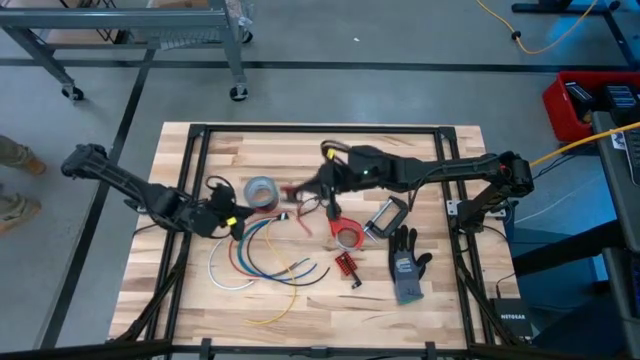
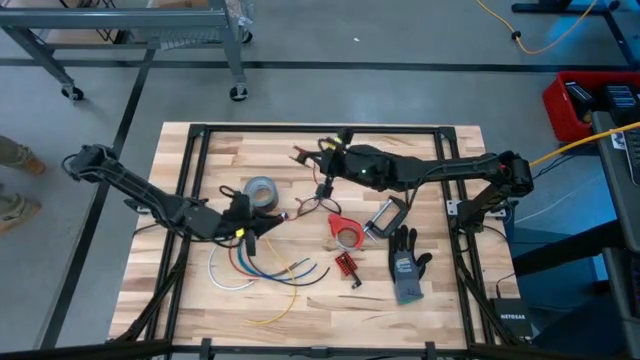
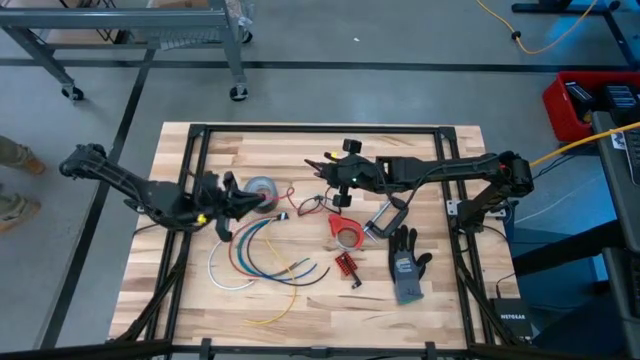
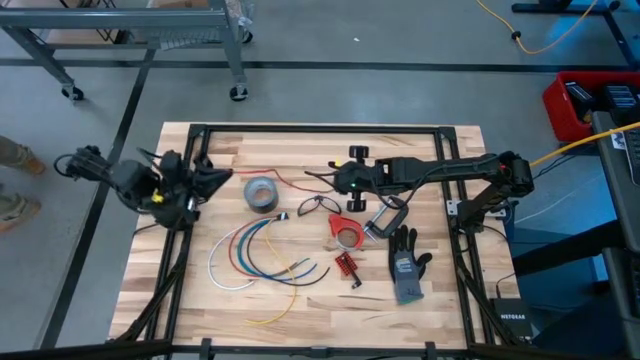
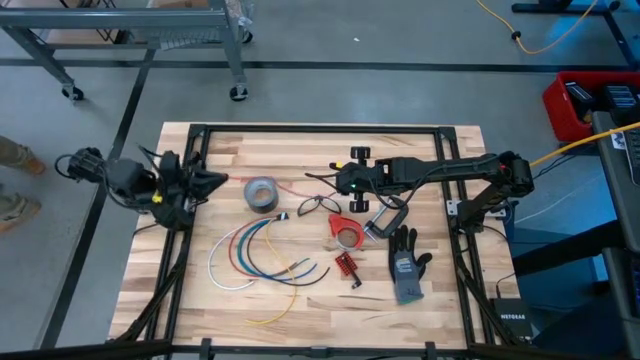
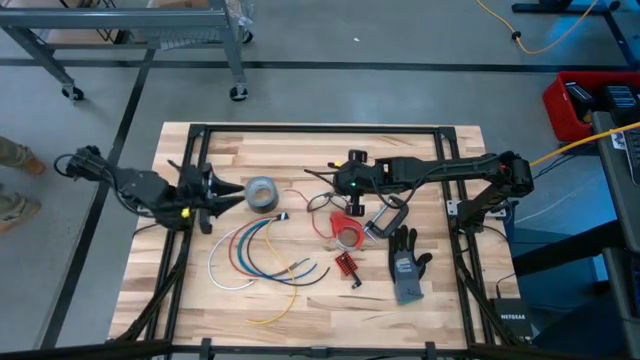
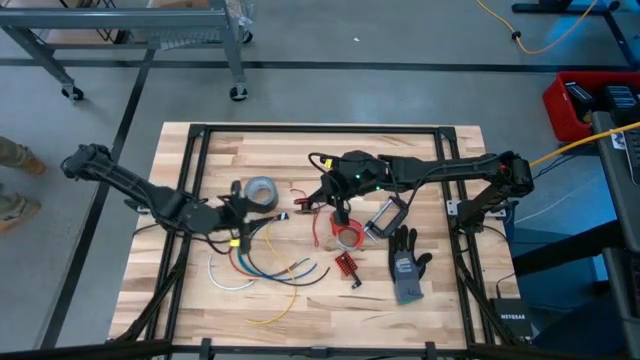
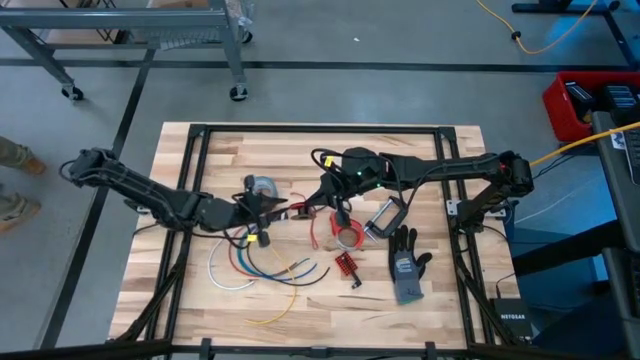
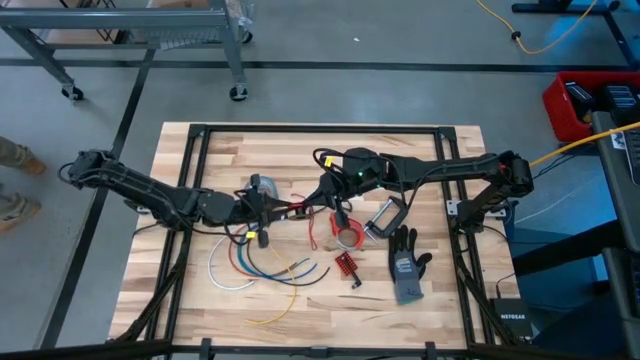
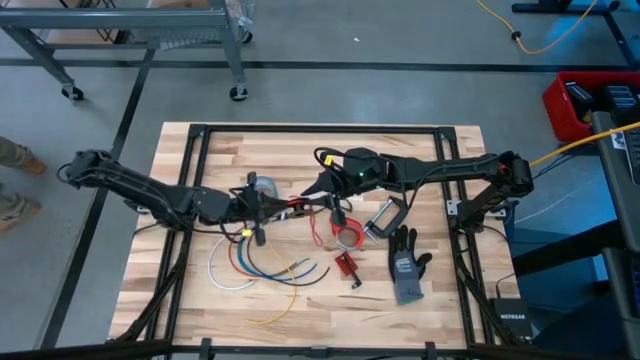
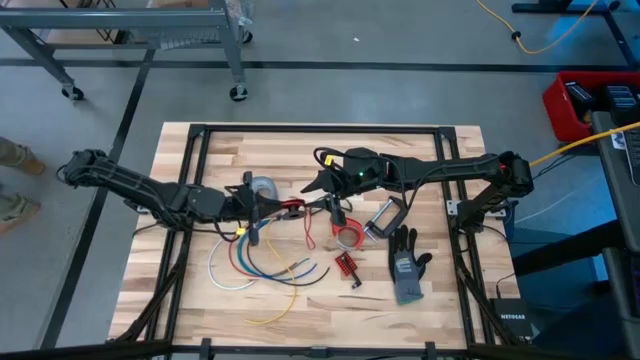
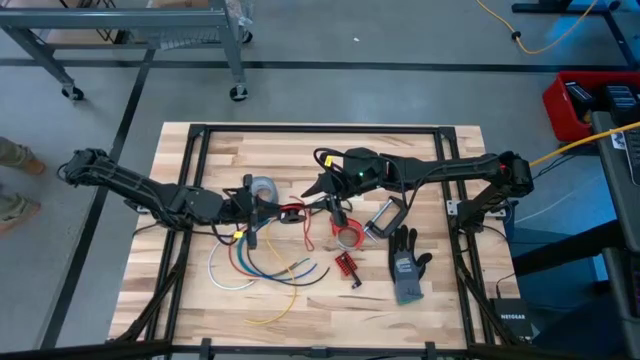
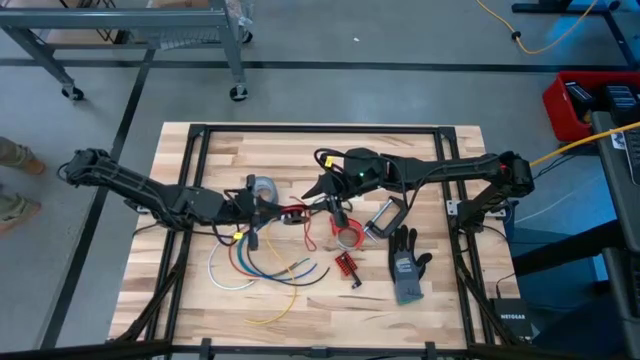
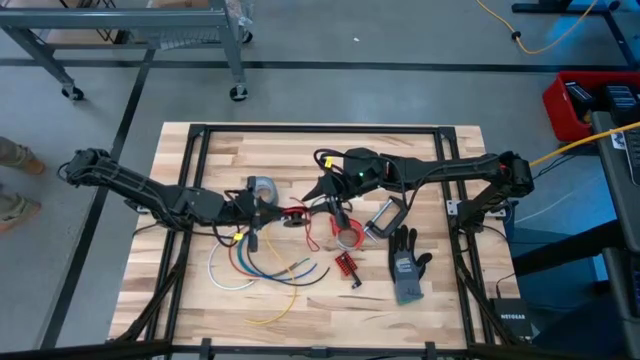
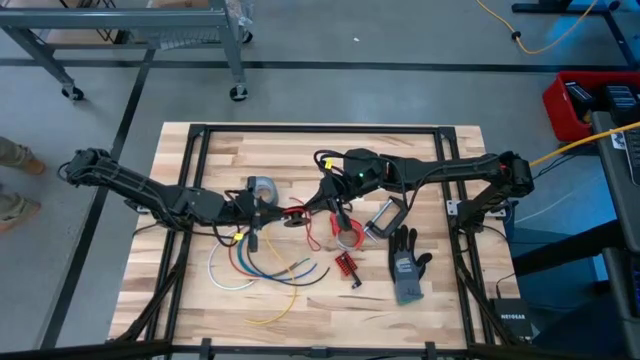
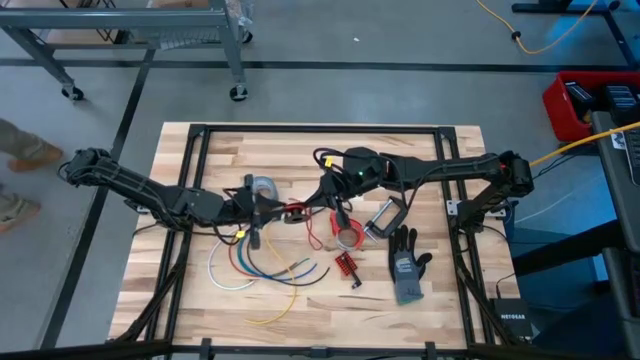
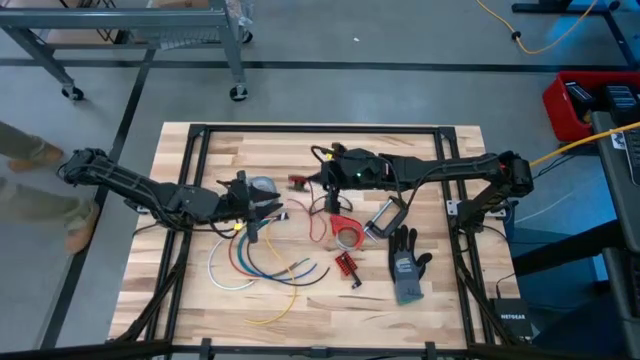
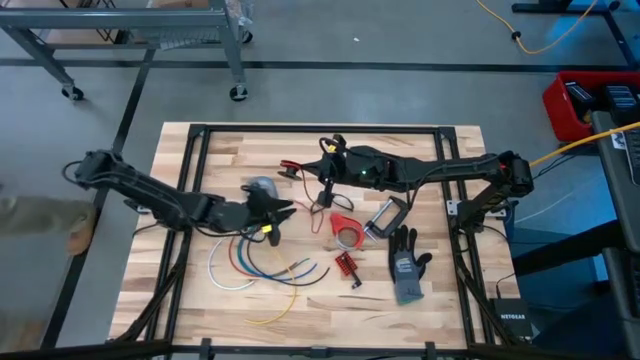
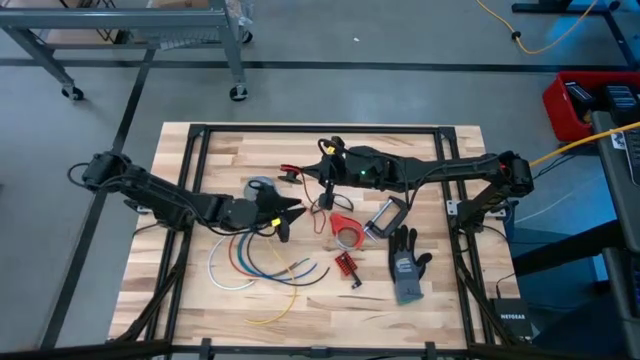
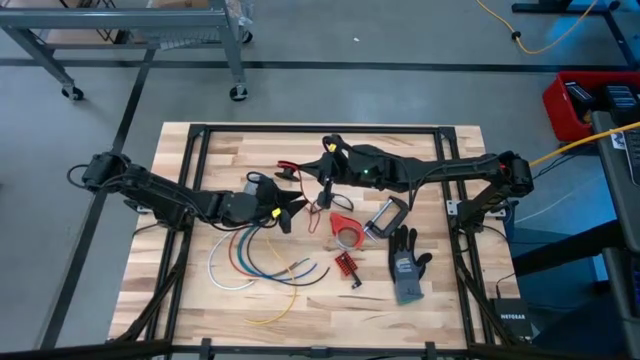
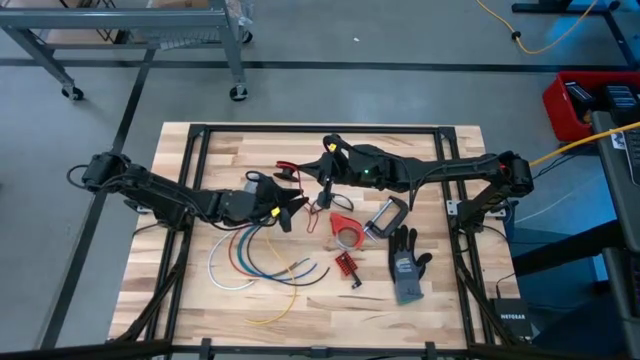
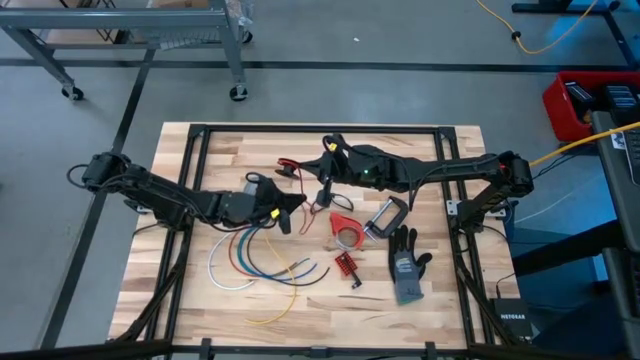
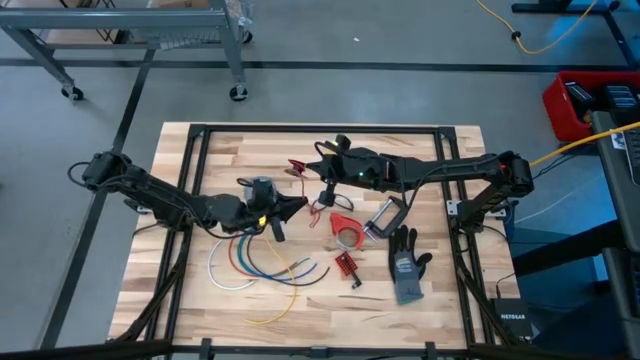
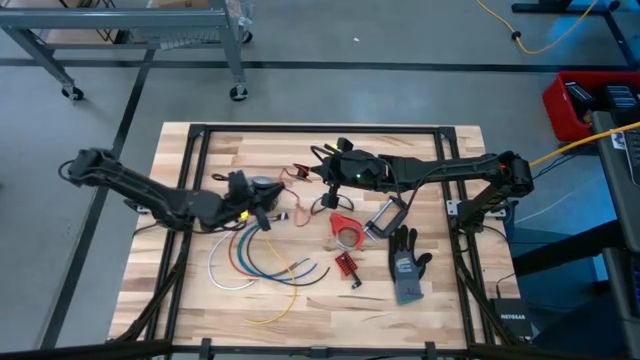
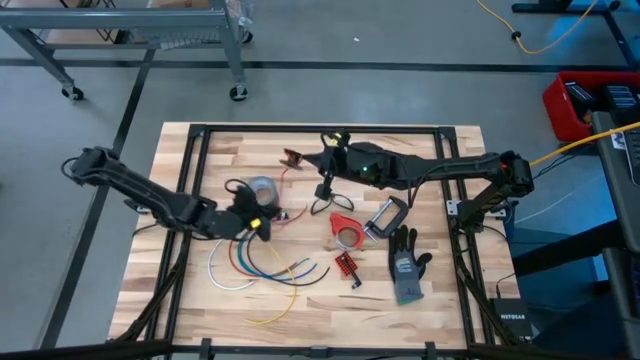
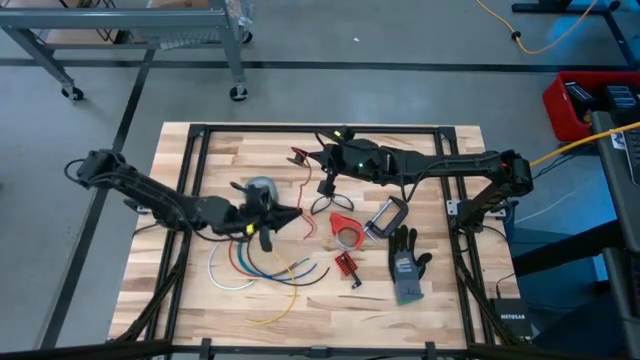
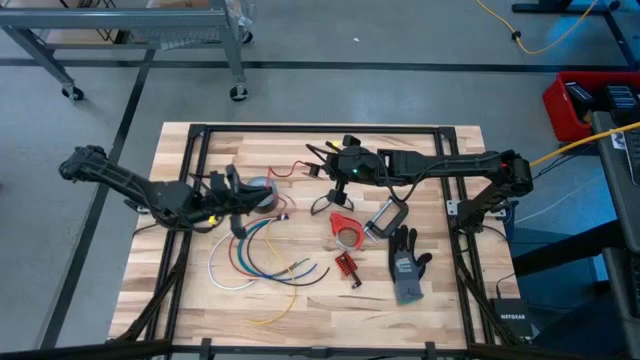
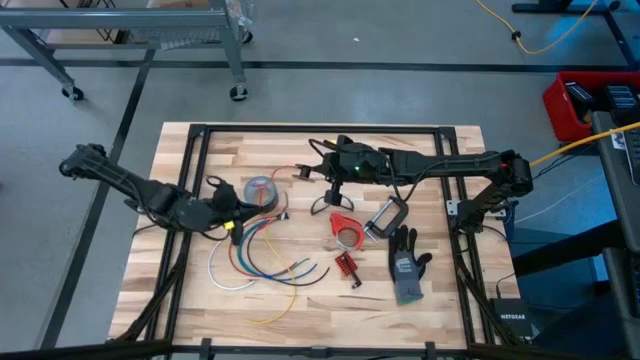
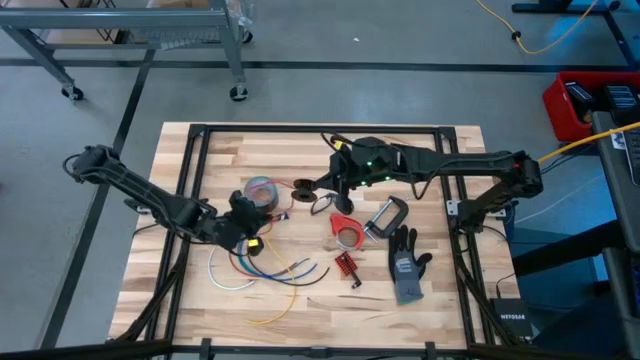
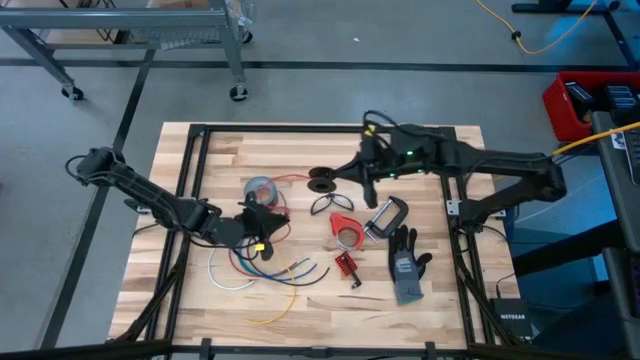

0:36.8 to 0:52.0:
Task: Coil cords
Uncoil the red wire from the spool

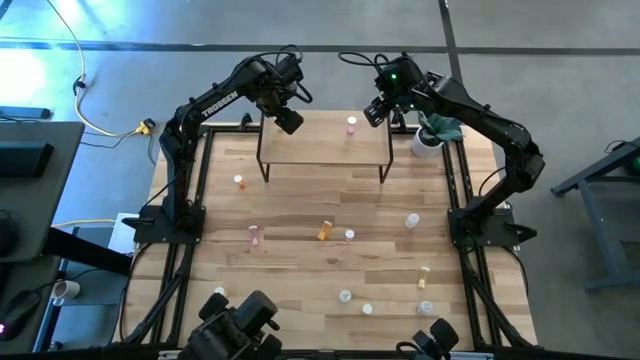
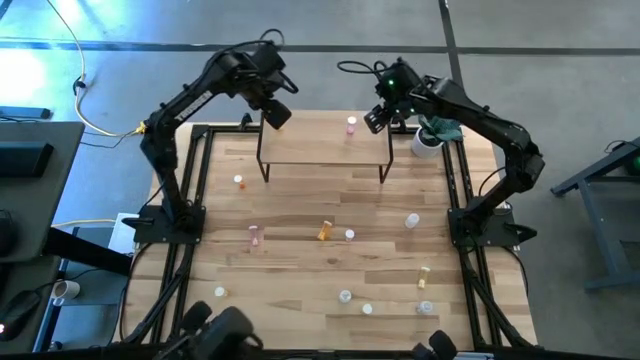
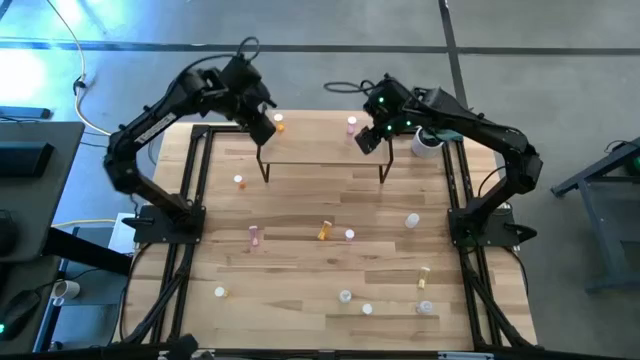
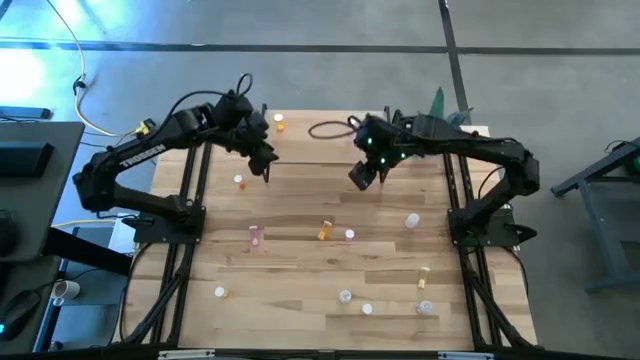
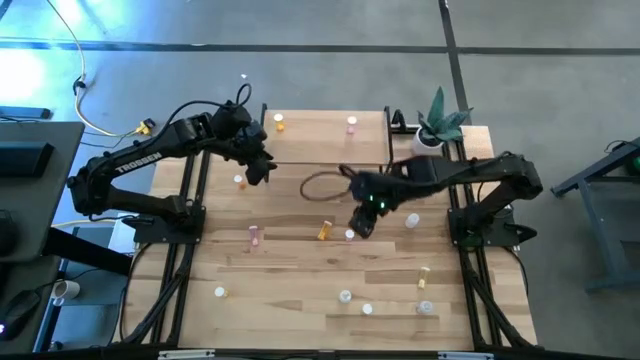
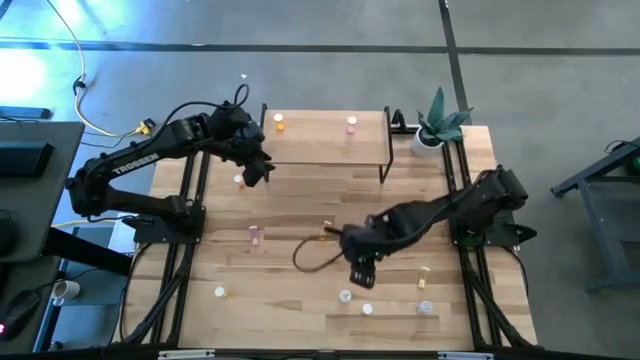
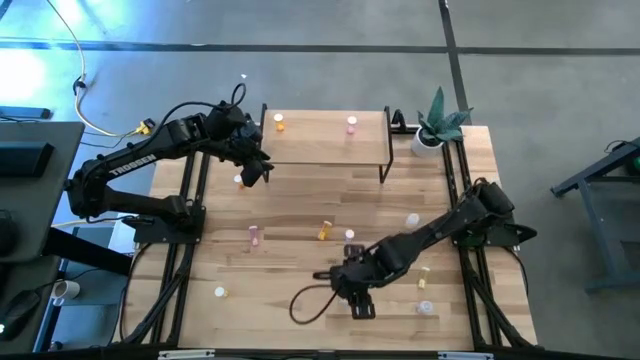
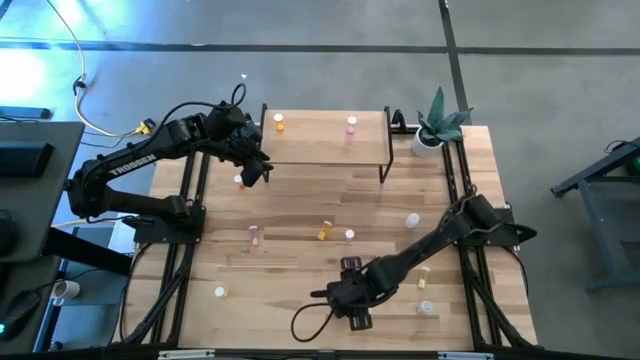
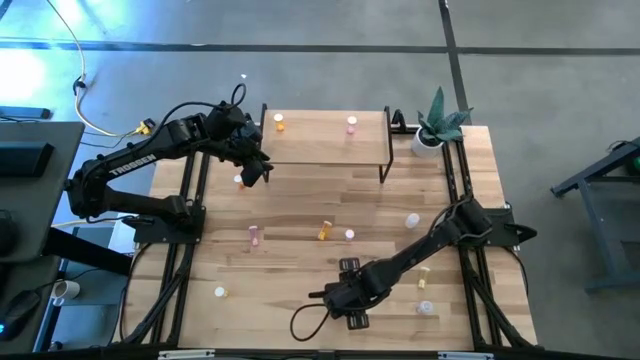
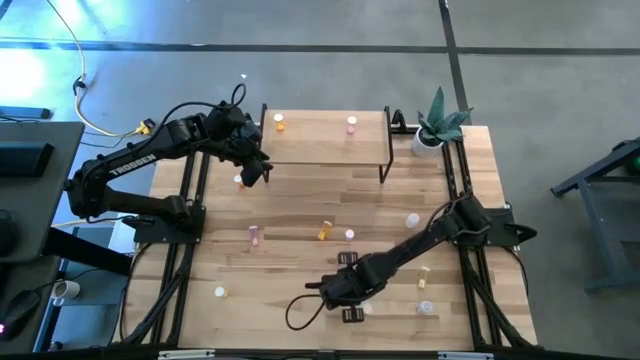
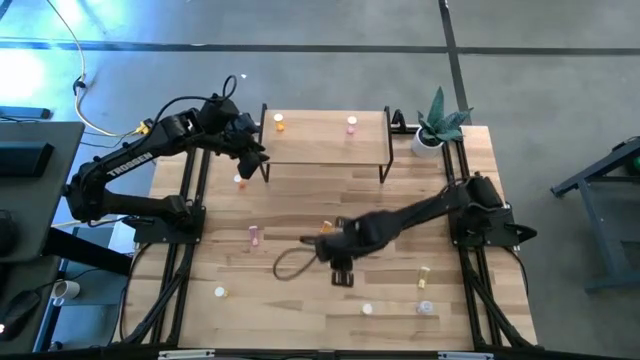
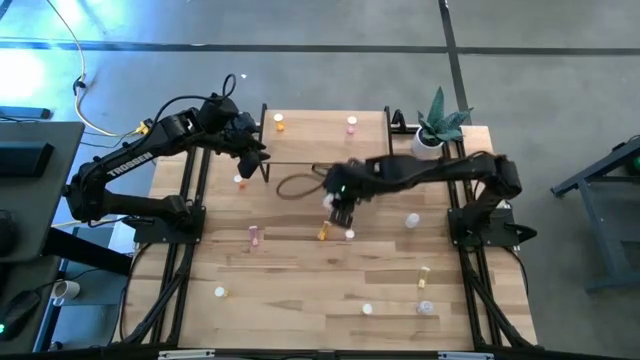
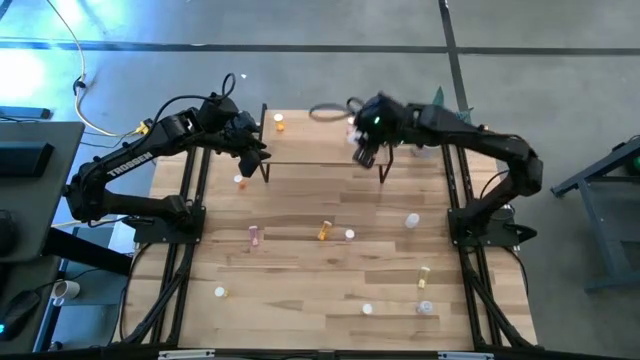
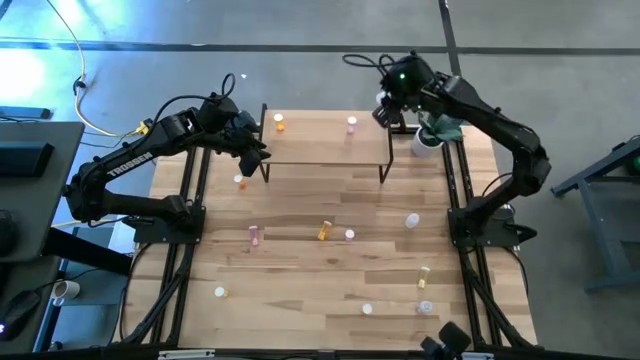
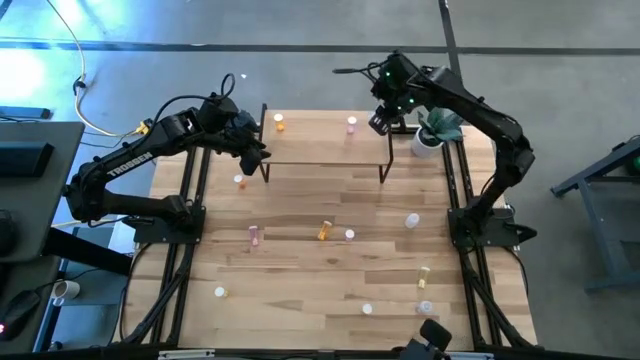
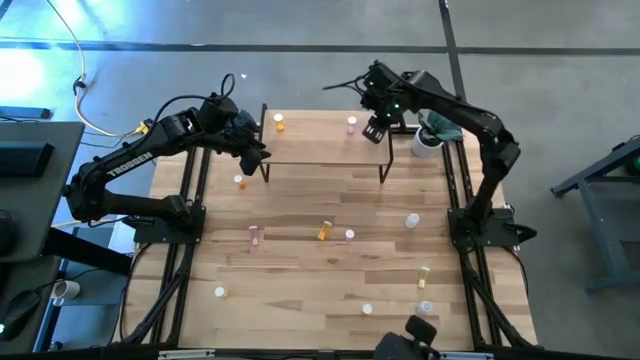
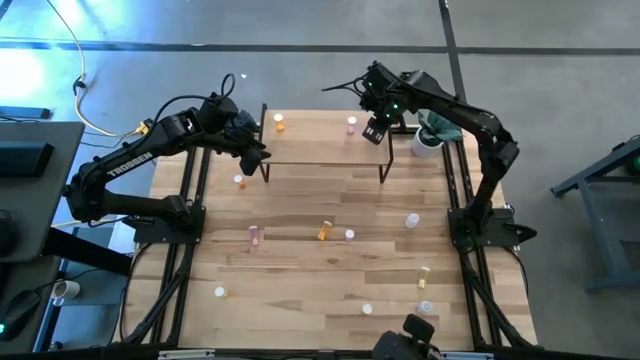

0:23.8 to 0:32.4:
Task: Pick and place medicine bottles onto shelf by color
Put the bottom white pill bottle on the shelf
